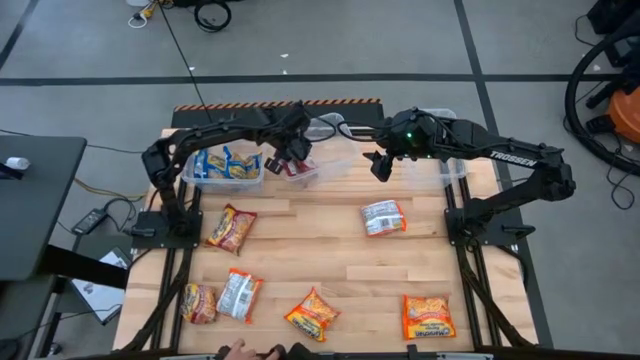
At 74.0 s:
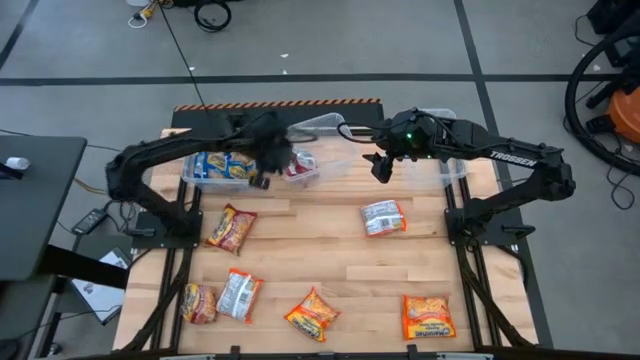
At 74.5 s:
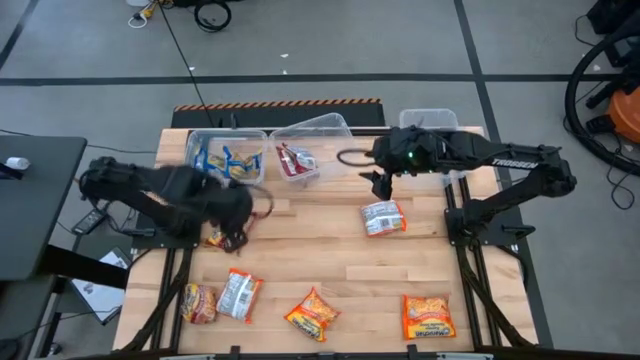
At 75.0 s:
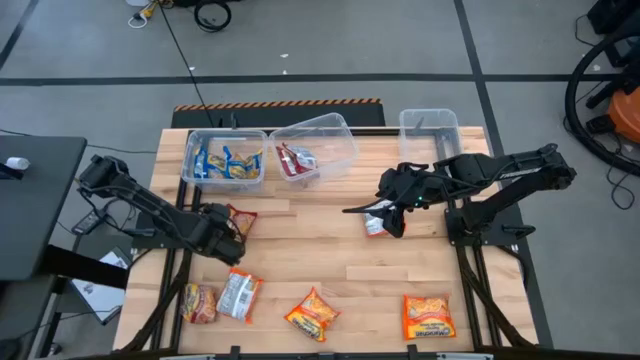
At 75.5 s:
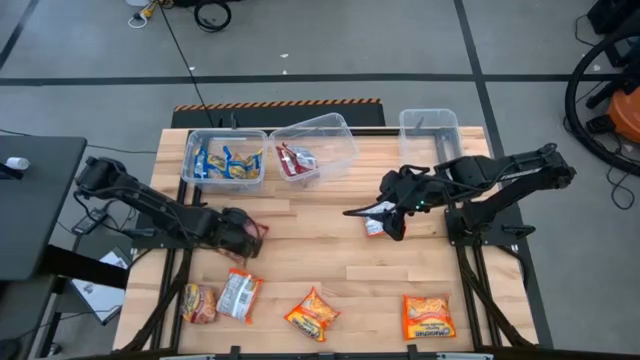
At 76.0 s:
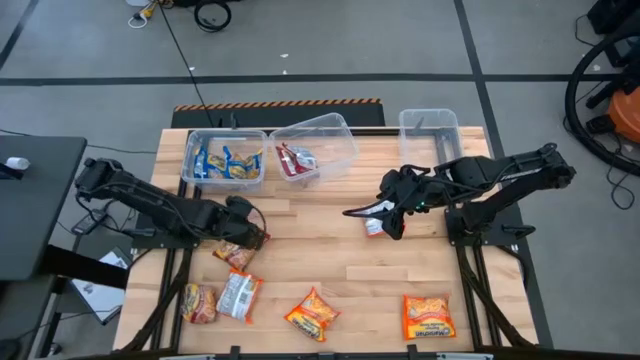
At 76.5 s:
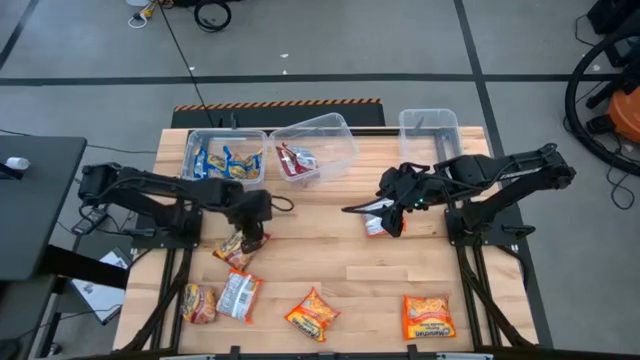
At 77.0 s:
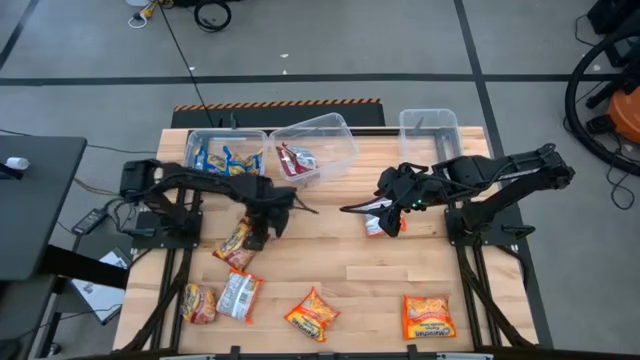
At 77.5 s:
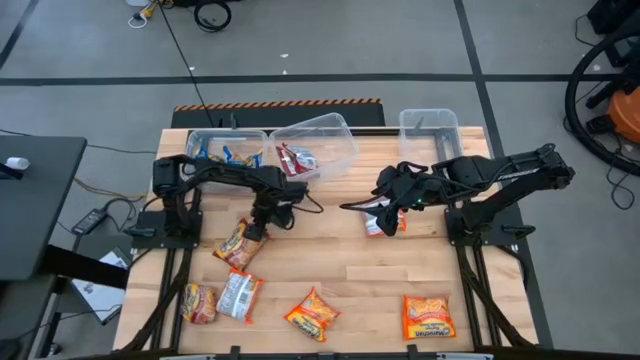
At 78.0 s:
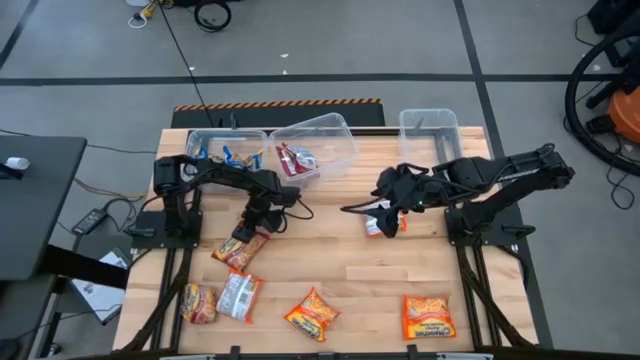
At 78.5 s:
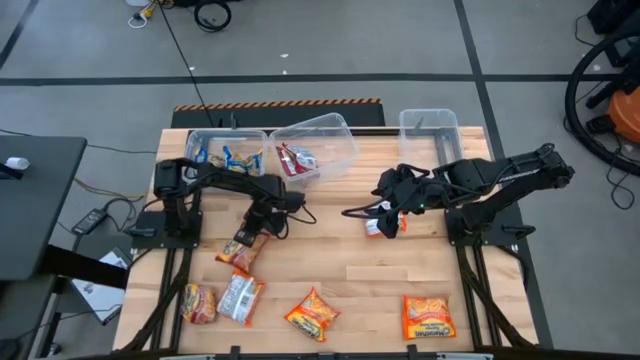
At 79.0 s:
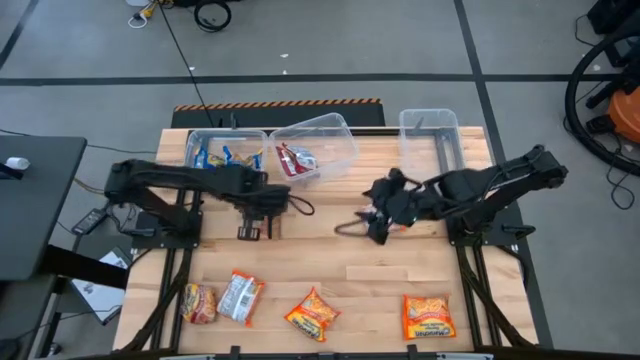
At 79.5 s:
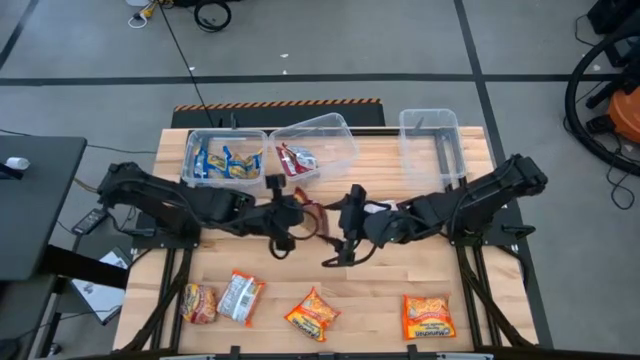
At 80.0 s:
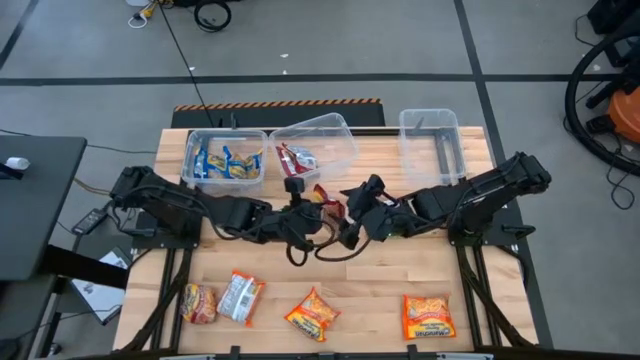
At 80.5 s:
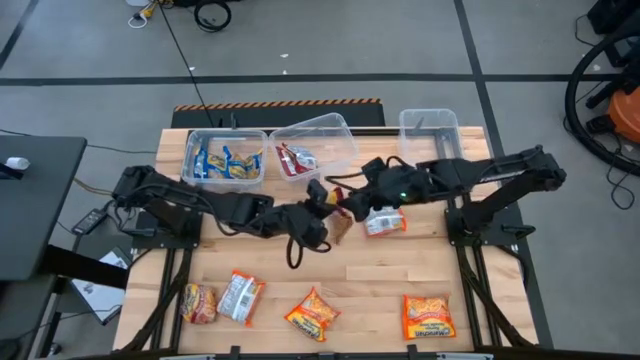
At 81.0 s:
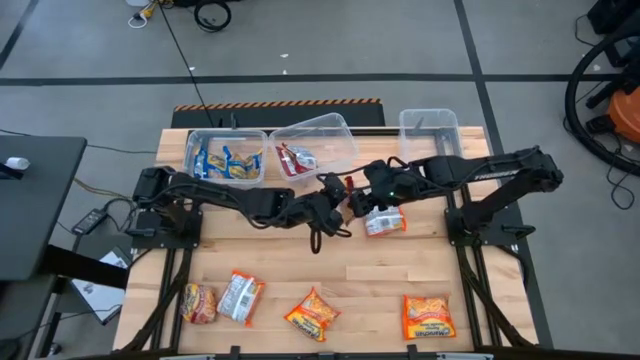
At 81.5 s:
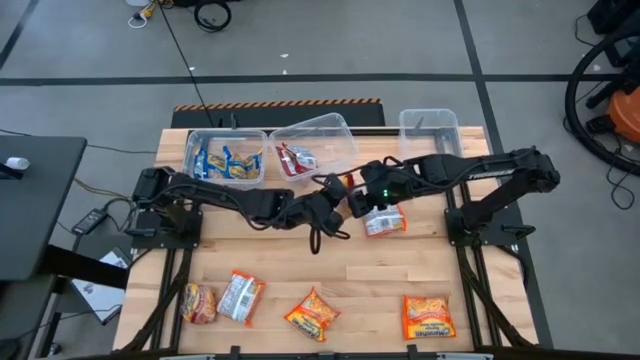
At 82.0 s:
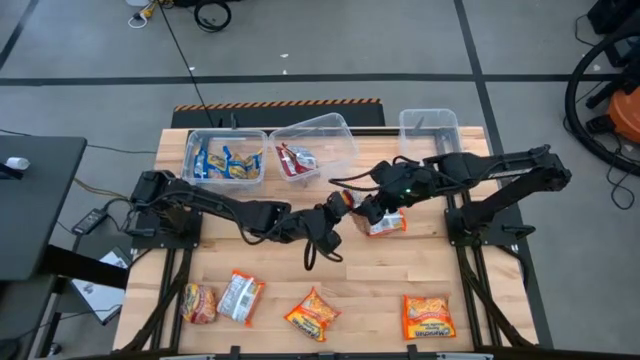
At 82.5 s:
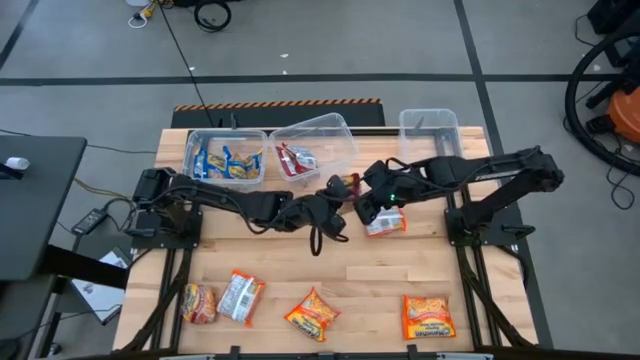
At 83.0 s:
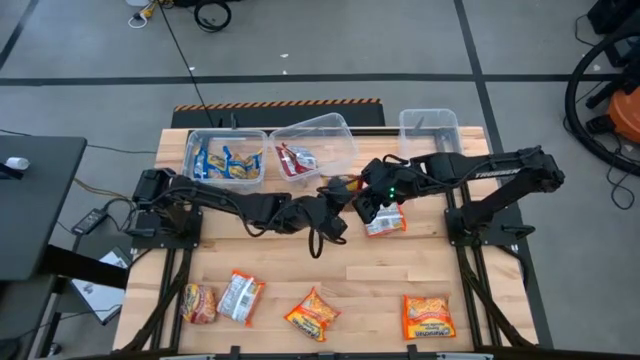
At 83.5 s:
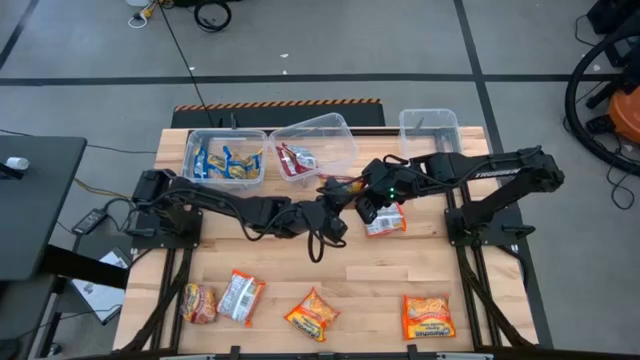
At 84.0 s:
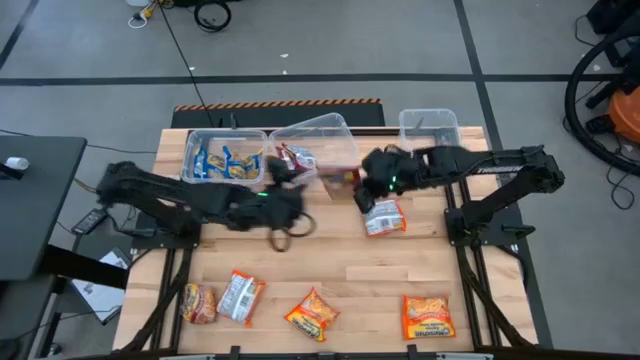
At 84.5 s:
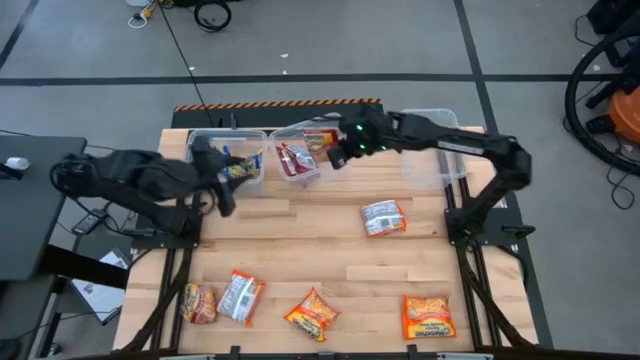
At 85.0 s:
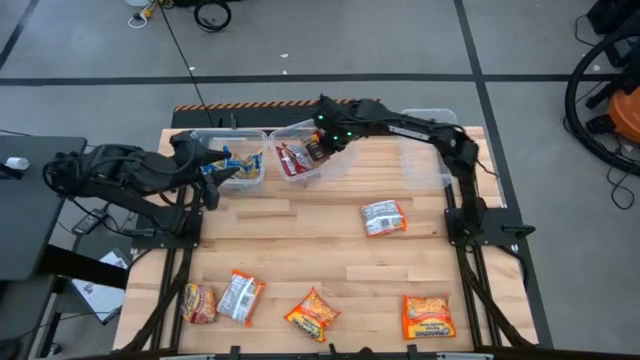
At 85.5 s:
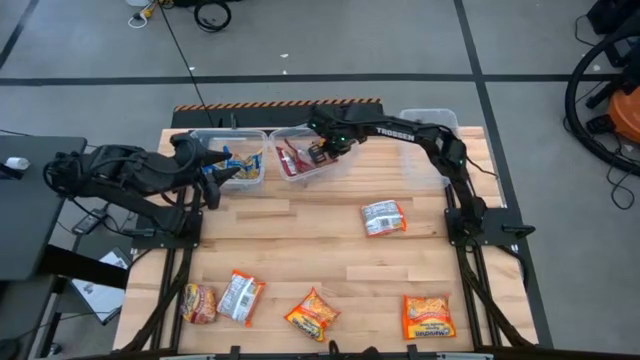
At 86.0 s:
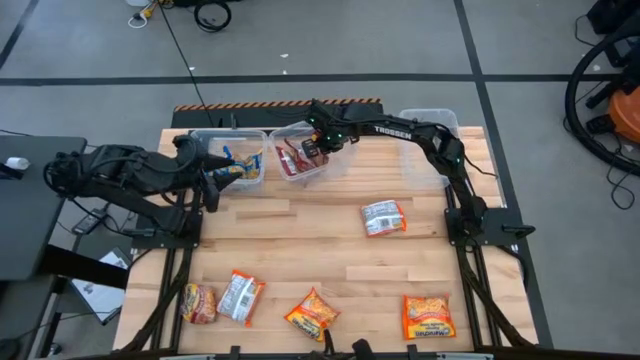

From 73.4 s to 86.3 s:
Task: Sort Maruchan noodles
Put the top red noodle pack into the center transparent bin

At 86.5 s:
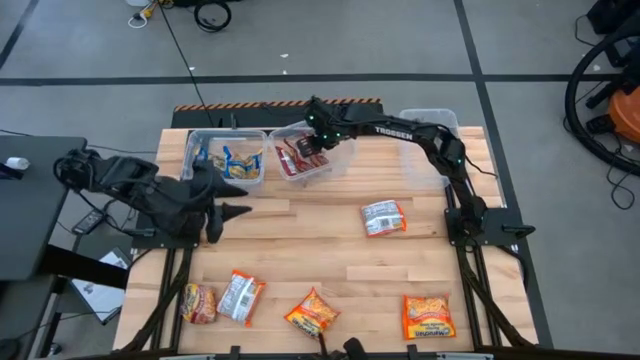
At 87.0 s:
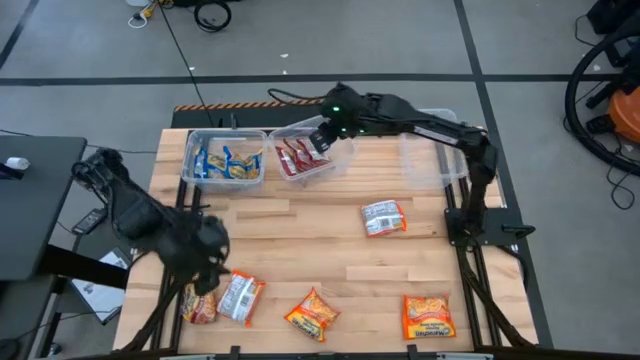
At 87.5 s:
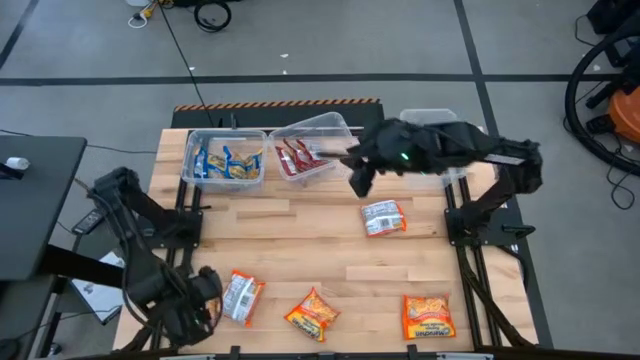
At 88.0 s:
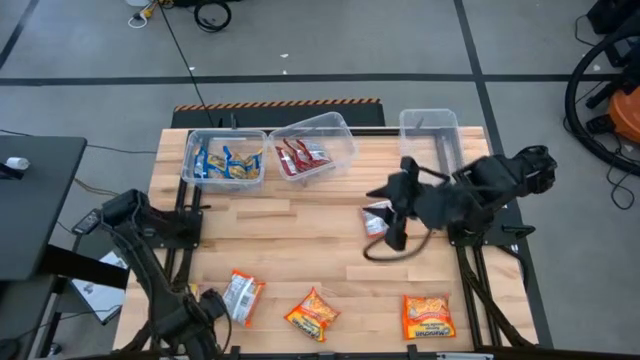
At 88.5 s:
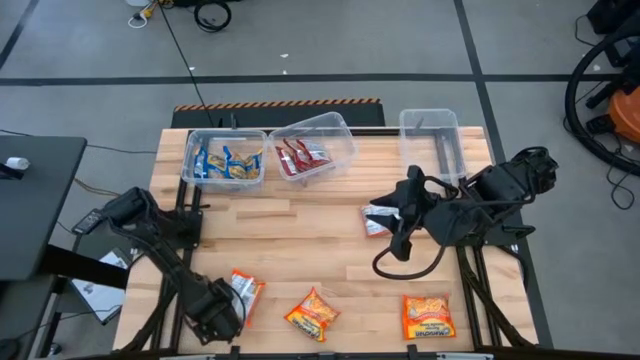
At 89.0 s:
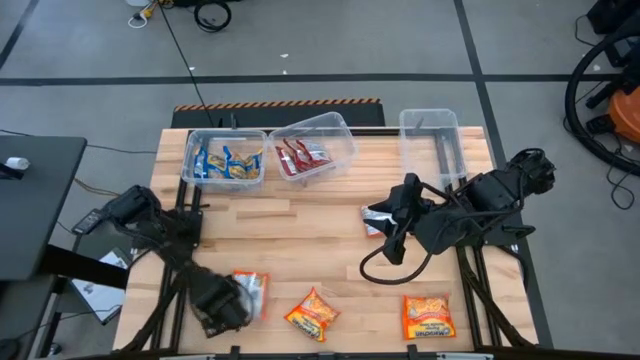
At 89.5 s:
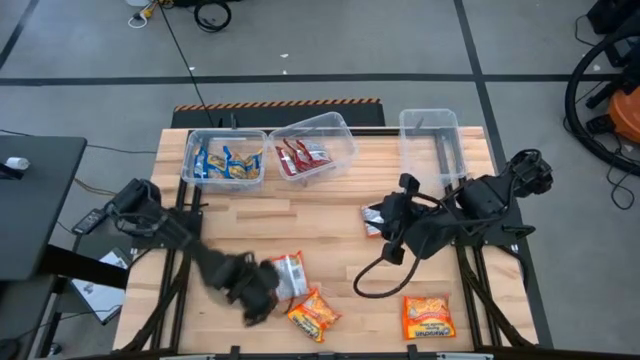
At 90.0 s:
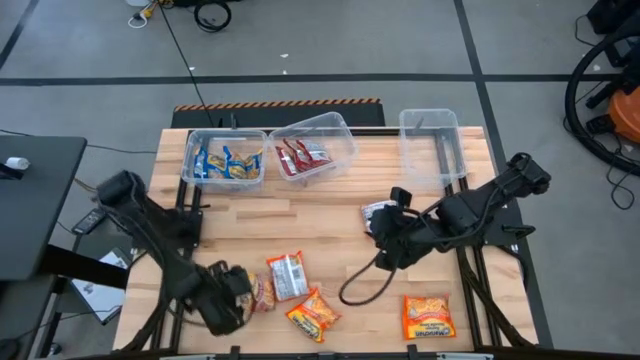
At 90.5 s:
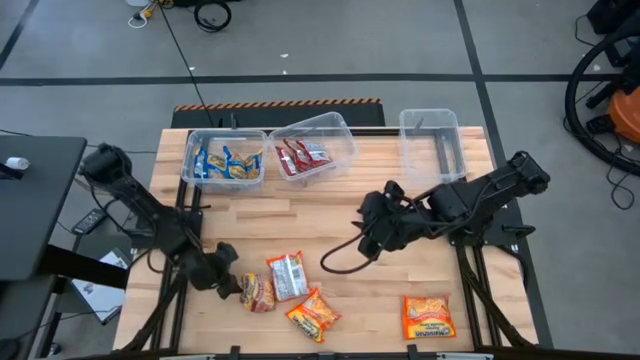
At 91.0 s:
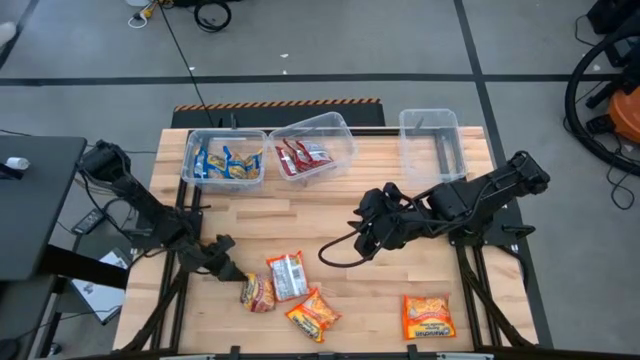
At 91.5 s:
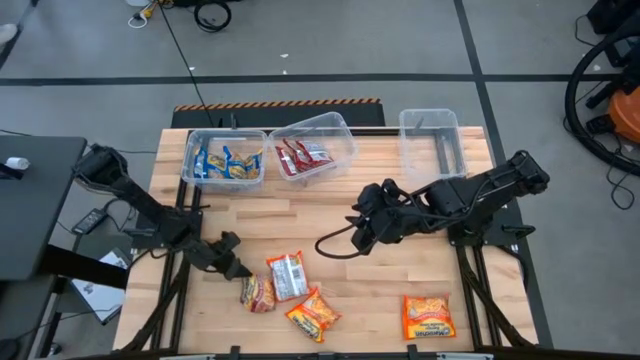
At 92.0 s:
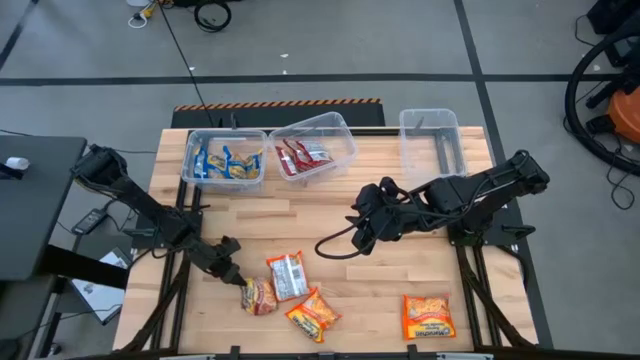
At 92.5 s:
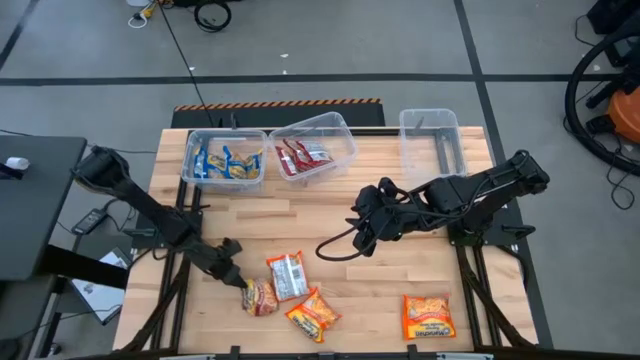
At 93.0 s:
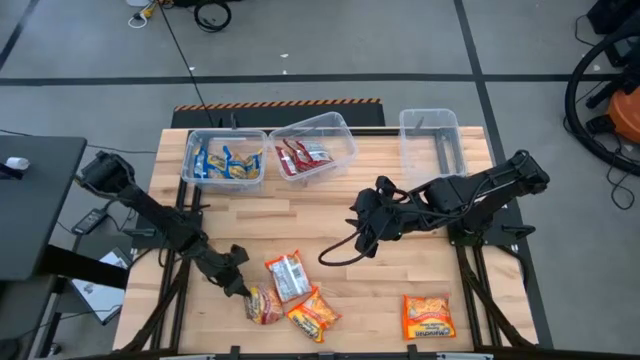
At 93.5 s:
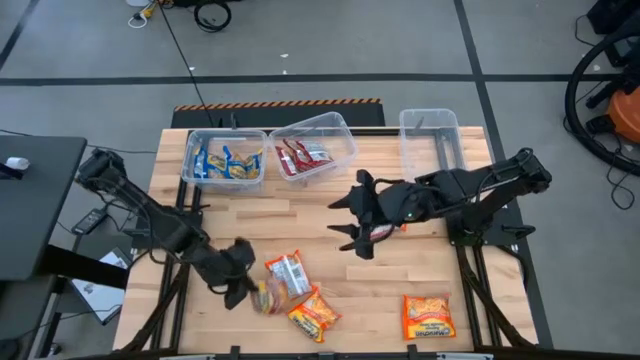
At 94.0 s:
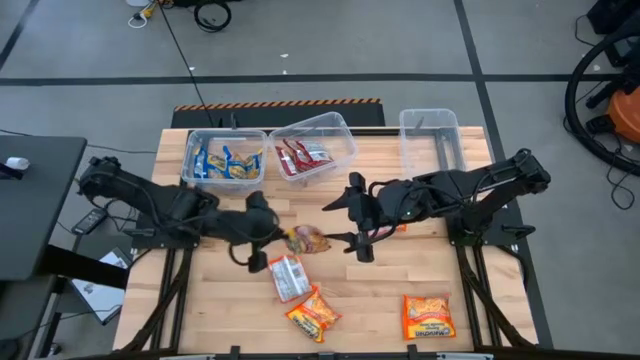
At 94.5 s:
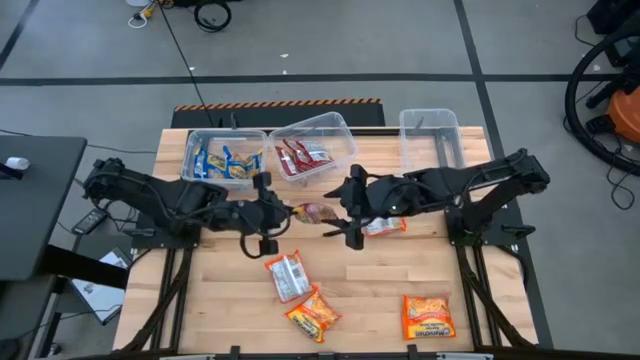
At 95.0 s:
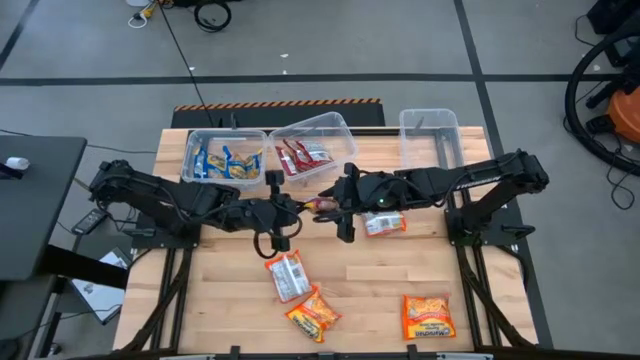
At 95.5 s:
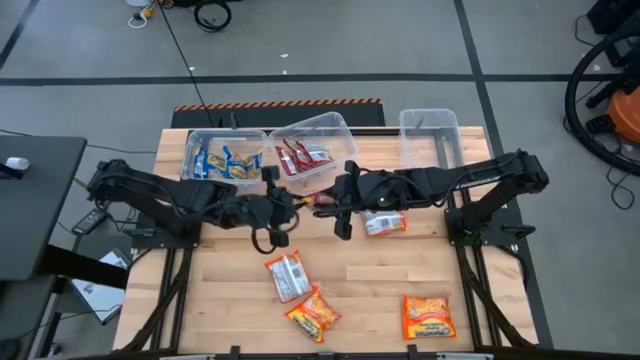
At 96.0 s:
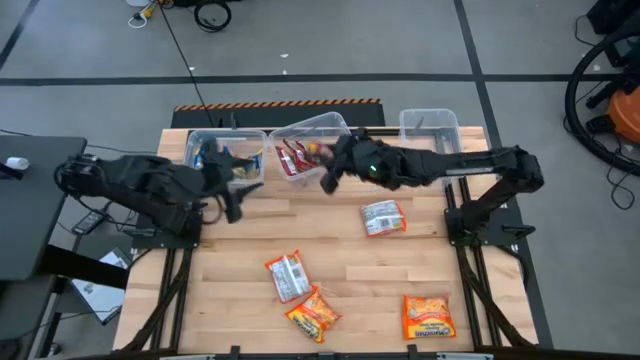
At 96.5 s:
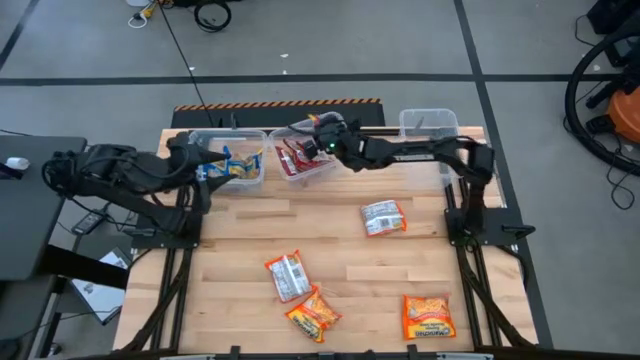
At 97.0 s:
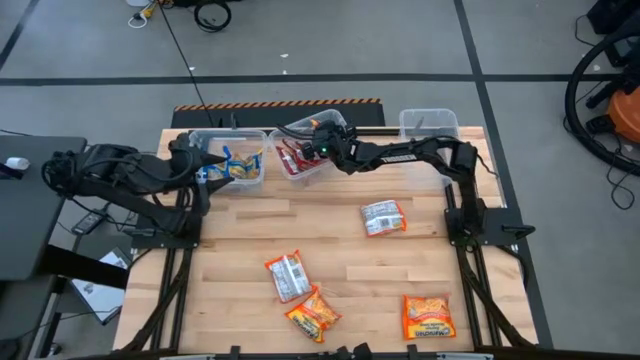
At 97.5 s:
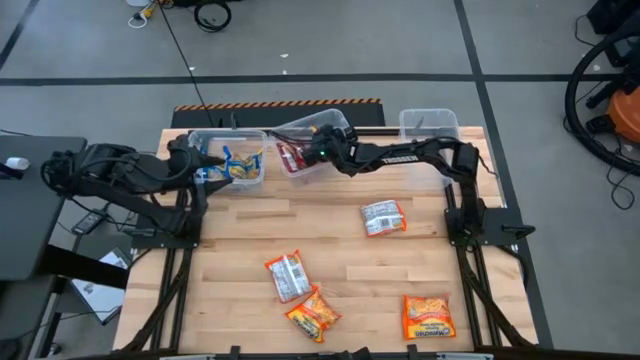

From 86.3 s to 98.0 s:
Put the red noodle pack into the center transparent bin
